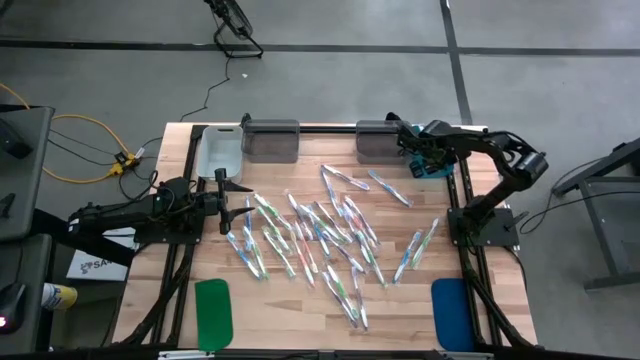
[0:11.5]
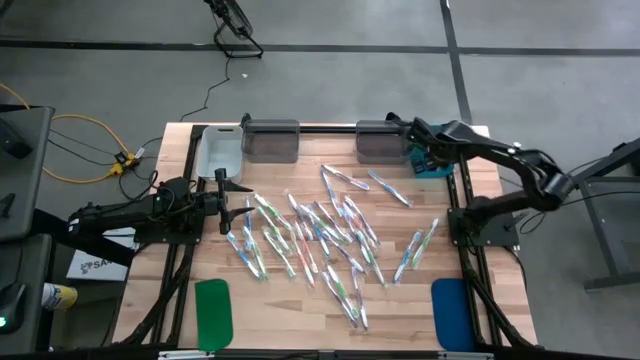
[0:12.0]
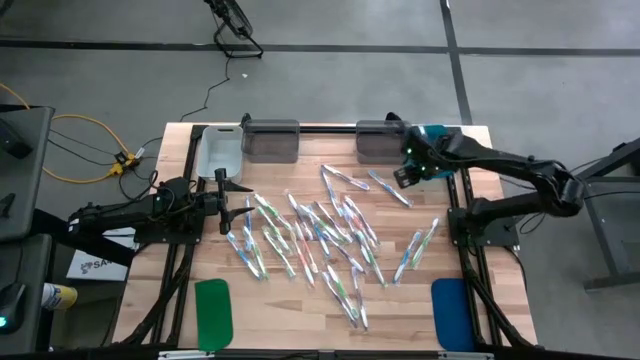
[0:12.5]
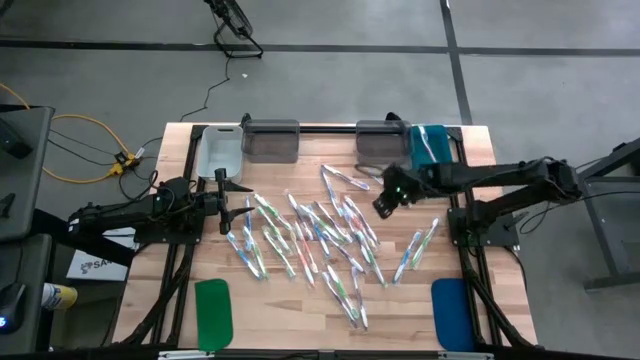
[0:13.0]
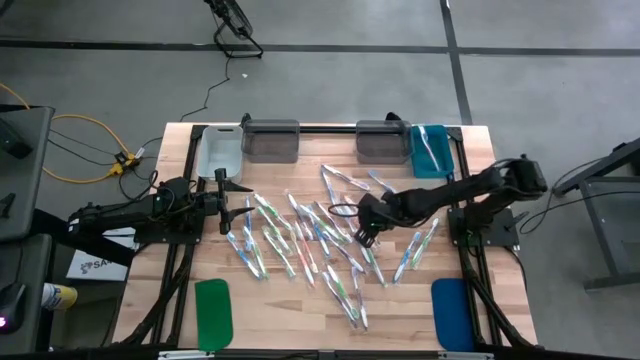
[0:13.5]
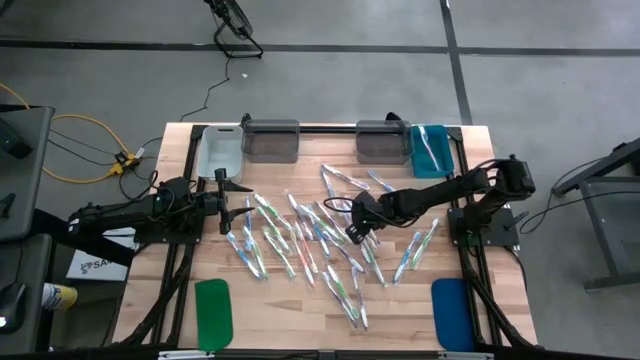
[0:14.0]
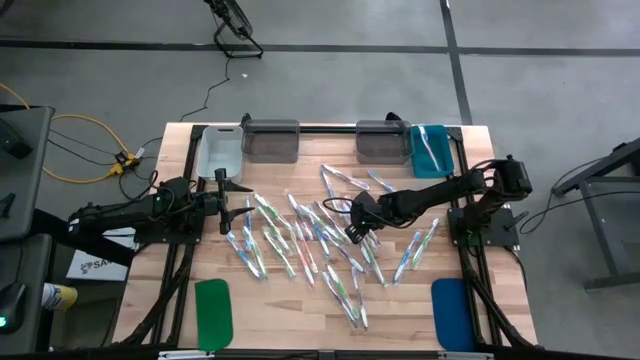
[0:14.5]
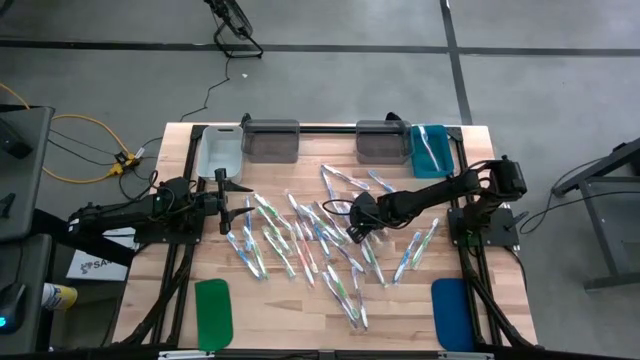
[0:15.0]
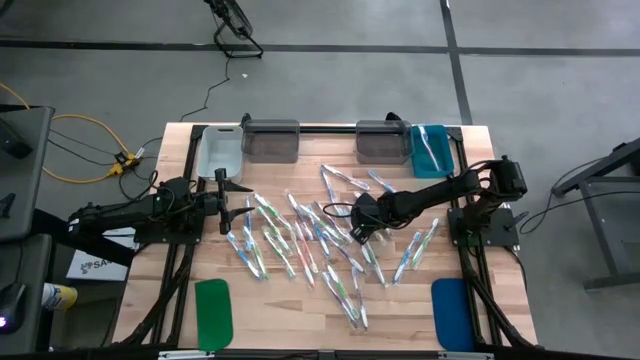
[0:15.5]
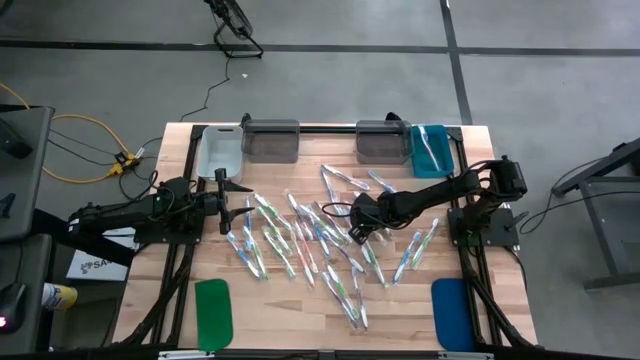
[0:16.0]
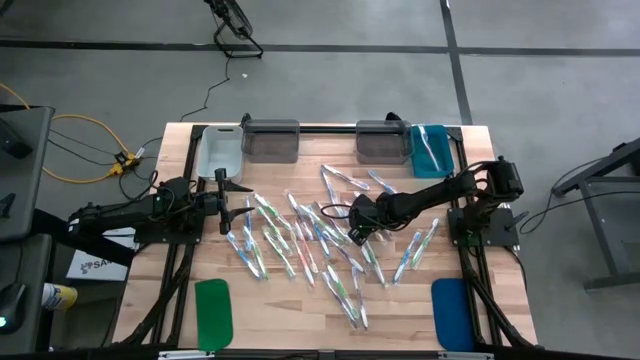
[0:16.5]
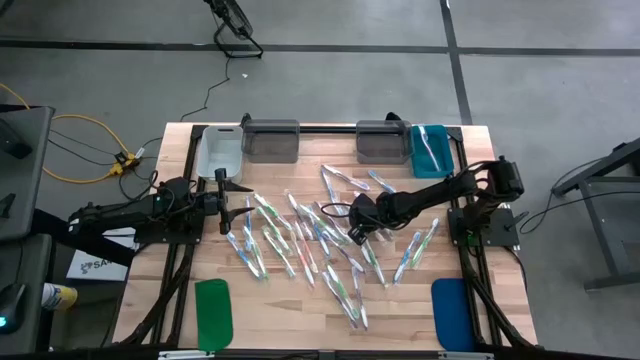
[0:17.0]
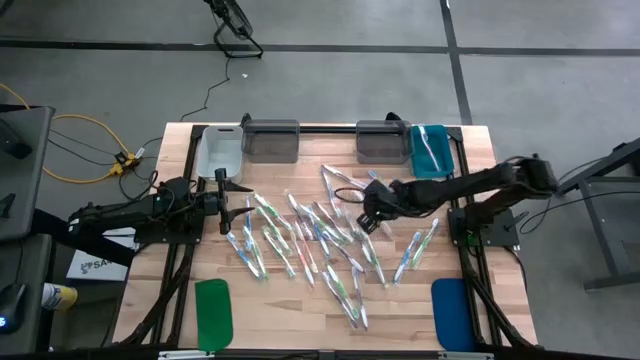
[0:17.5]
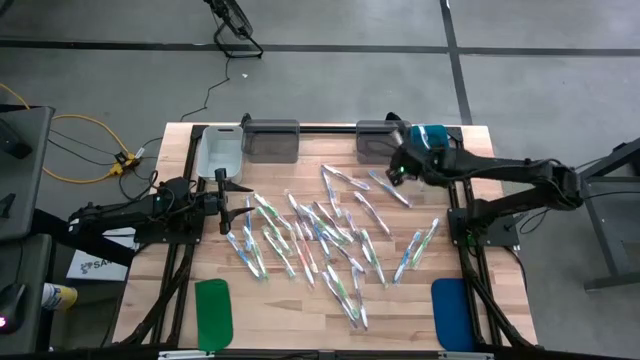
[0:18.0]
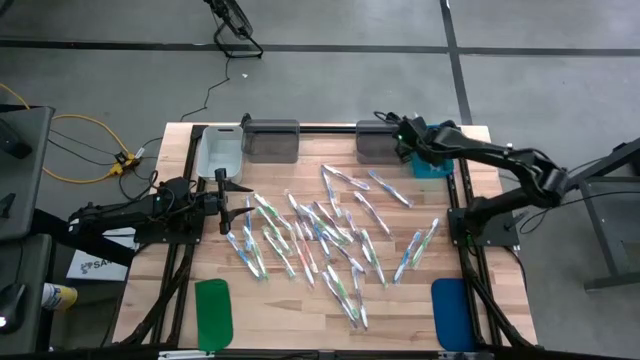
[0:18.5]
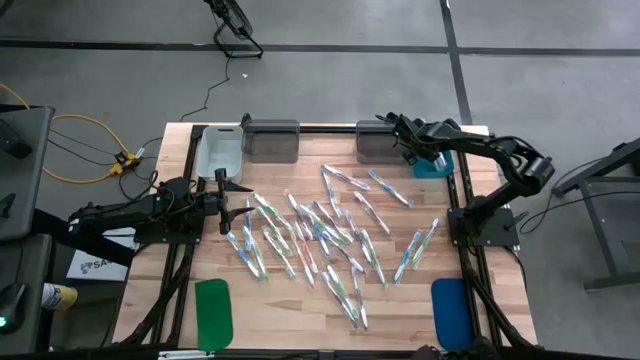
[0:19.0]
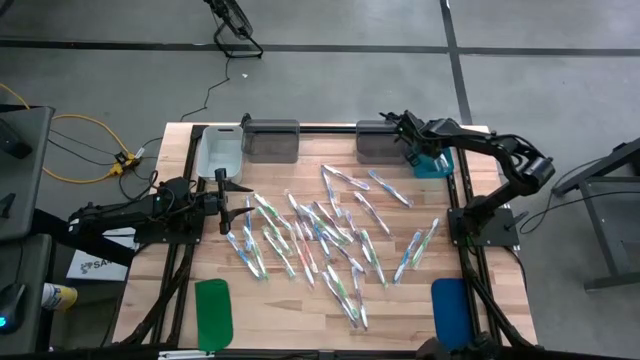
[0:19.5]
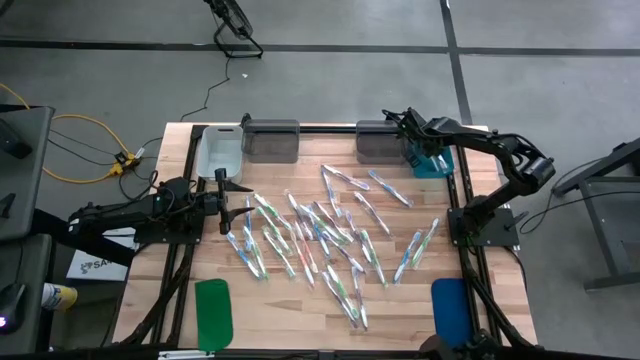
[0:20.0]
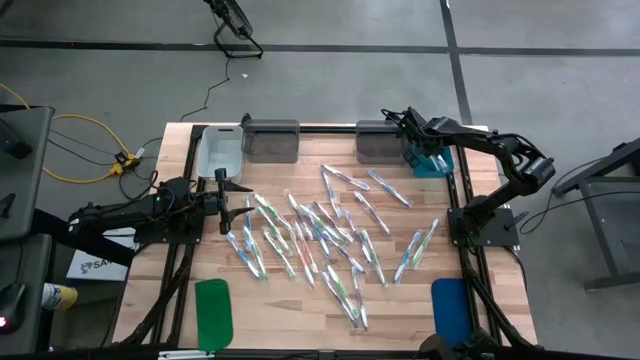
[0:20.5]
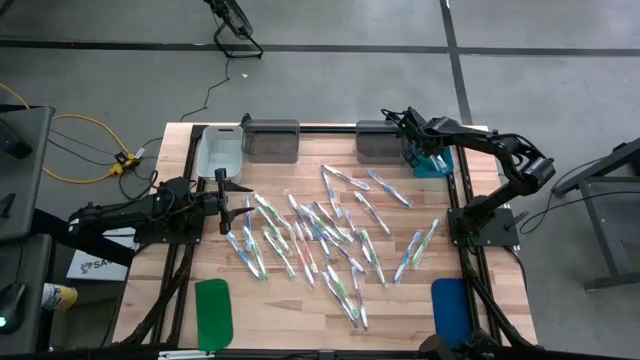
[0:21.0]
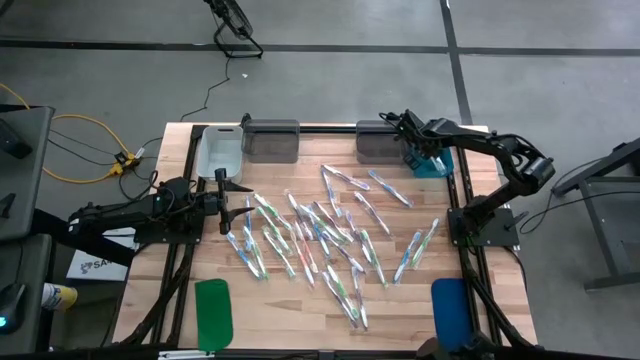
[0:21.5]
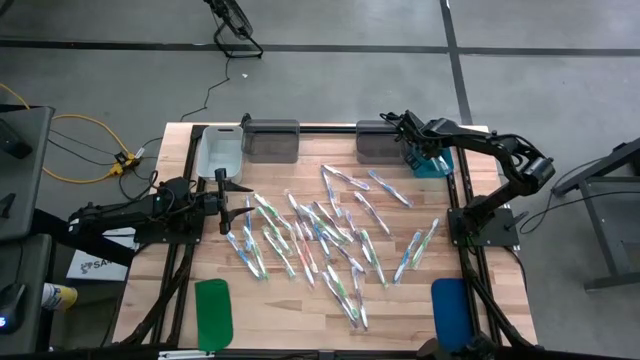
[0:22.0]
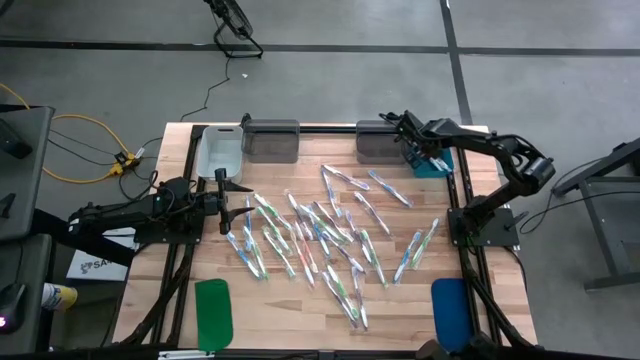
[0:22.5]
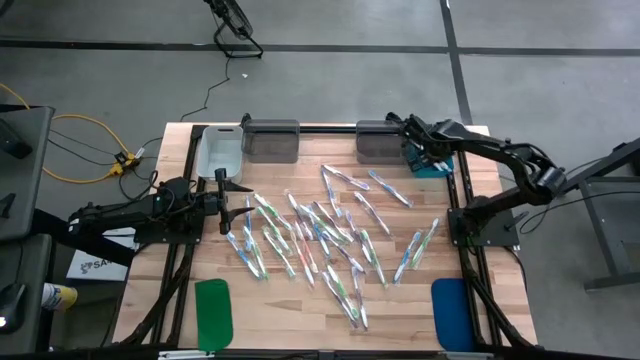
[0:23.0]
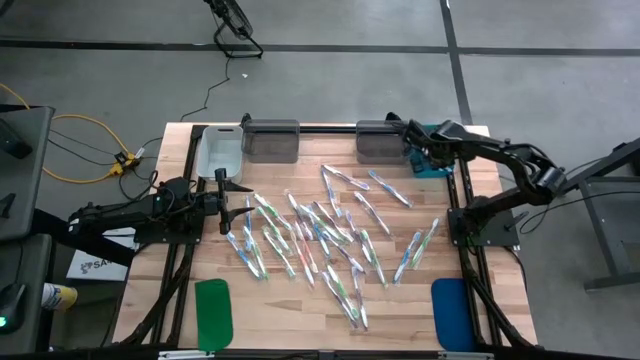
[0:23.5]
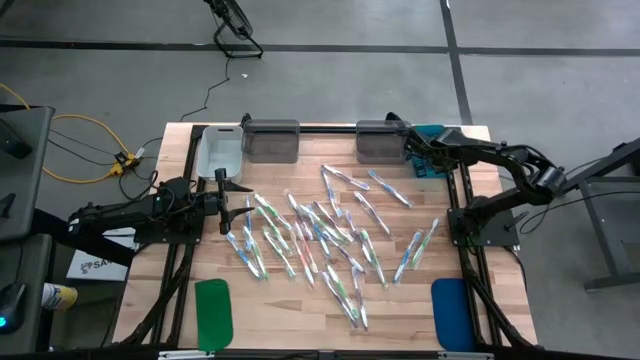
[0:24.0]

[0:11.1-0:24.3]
Task: Pick & Place Toothbrushes
Put the orange toothbrush into the blue bin

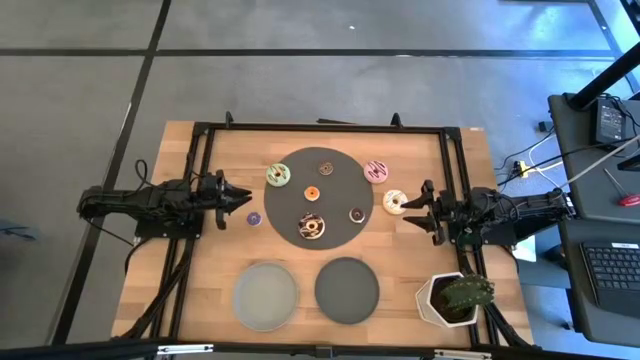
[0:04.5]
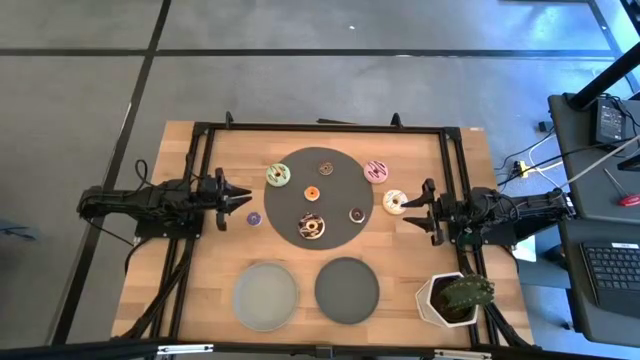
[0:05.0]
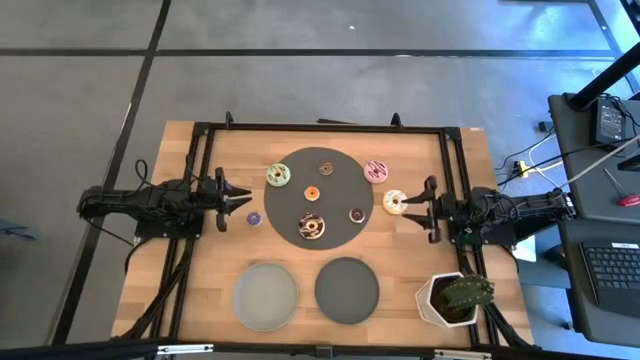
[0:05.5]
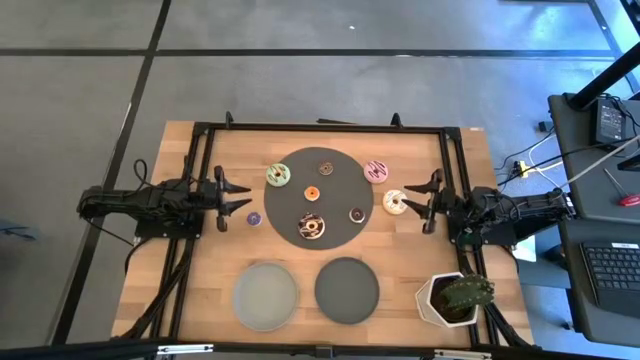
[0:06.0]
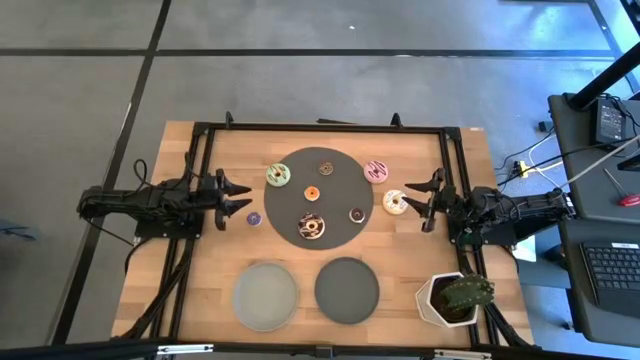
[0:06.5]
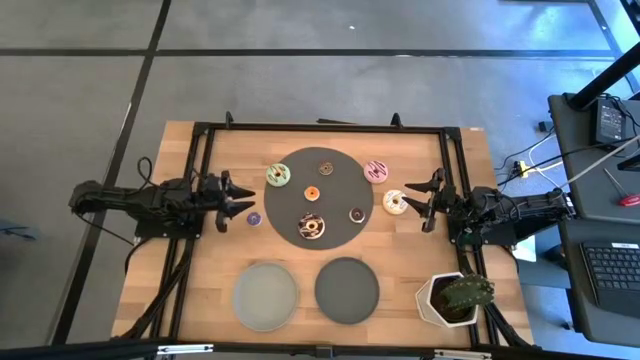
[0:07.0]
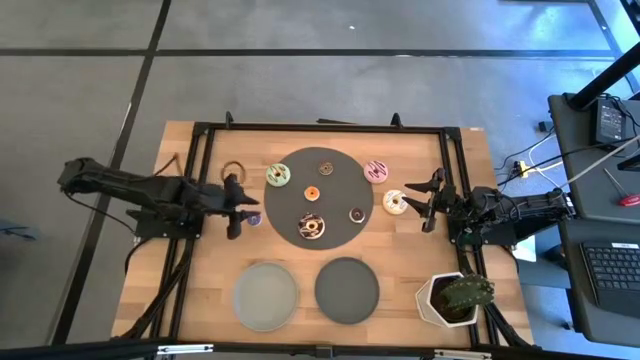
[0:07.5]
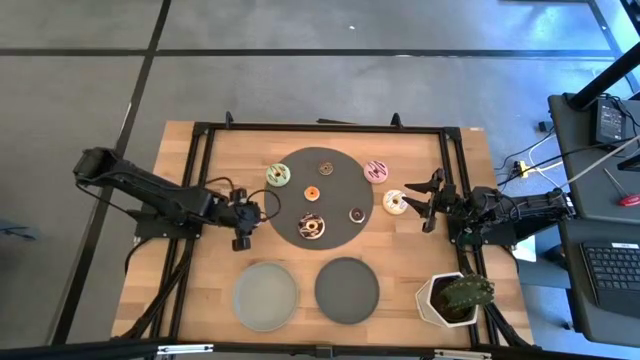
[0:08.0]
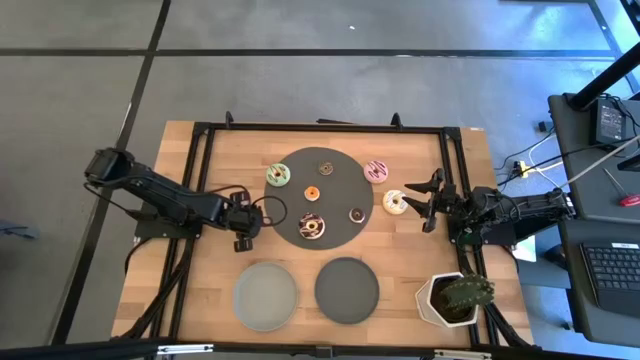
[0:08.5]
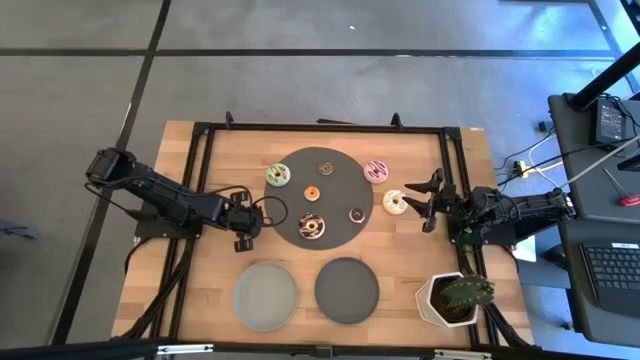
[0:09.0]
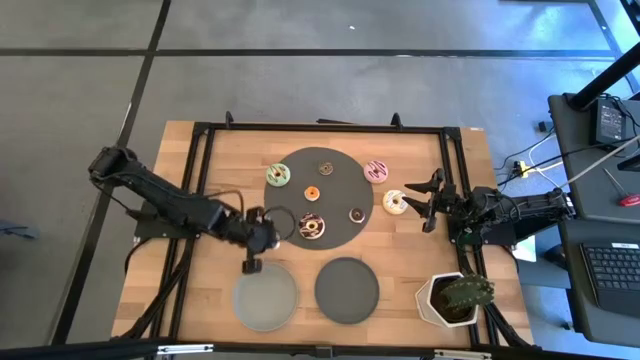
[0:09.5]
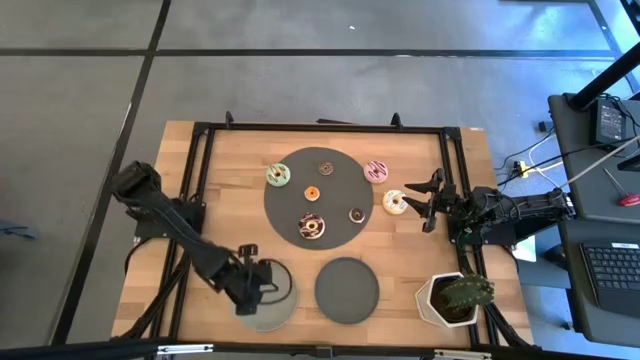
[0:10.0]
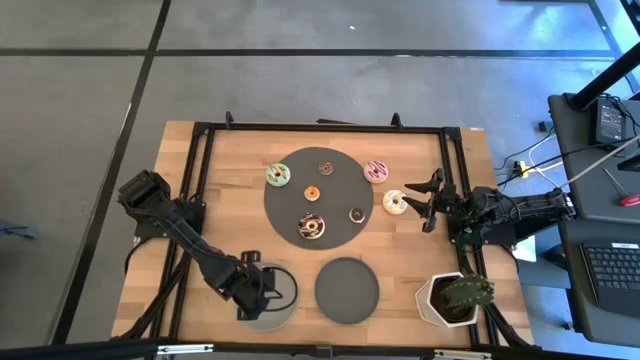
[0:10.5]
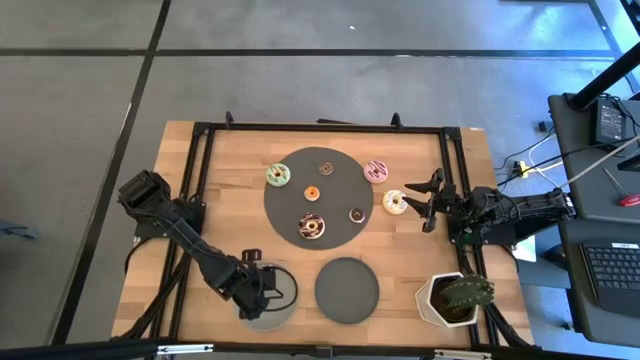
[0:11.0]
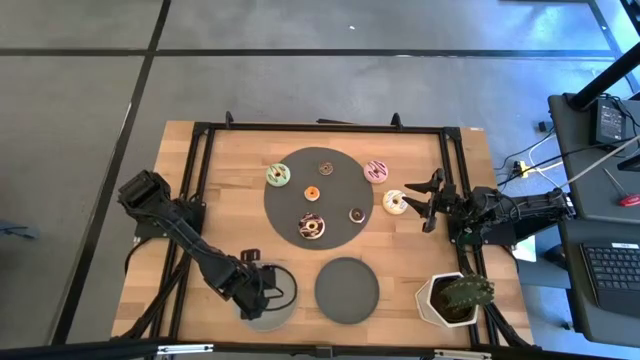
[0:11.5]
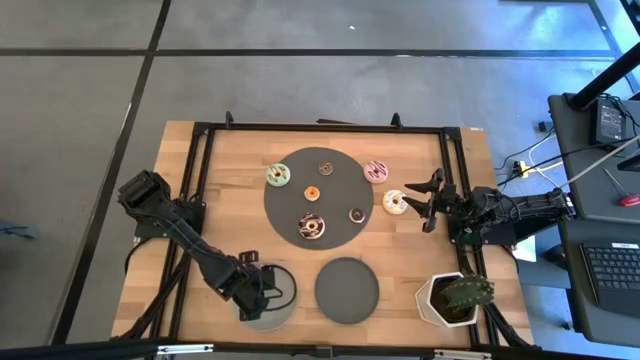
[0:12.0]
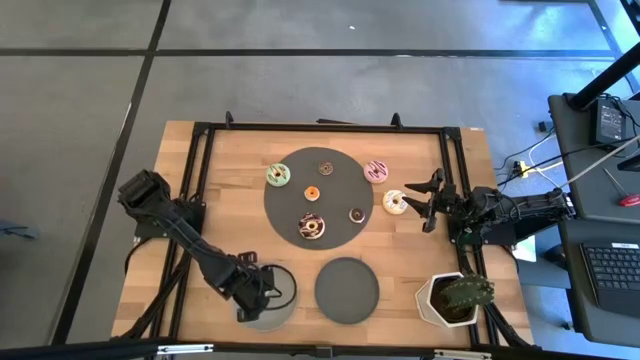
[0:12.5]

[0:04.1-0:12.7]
Task: Pick & Place donuts
Put the small blue donut on the gray plate
